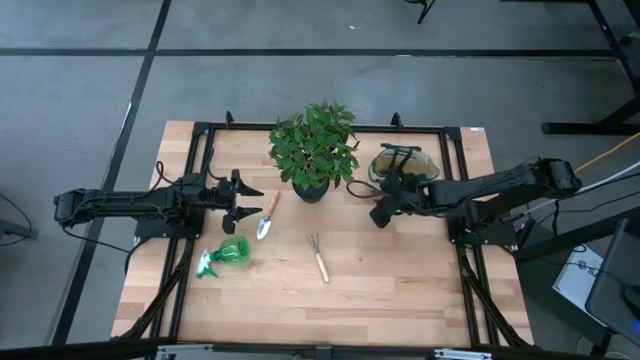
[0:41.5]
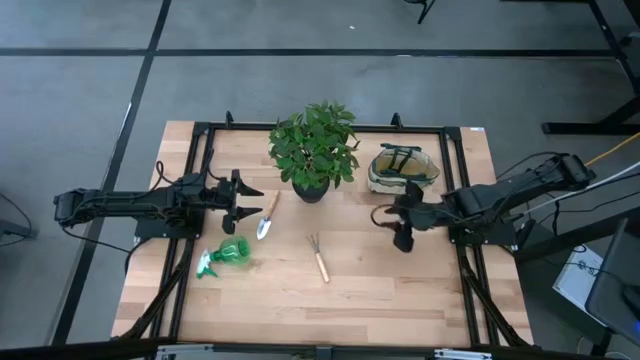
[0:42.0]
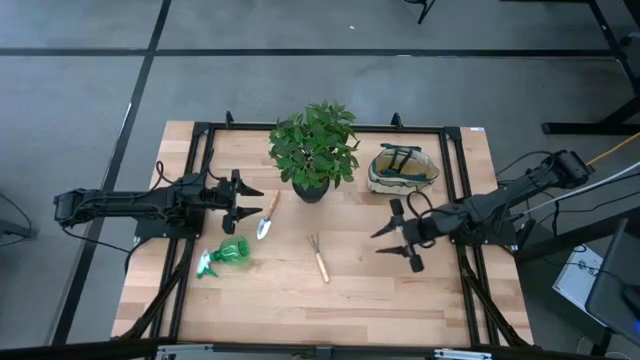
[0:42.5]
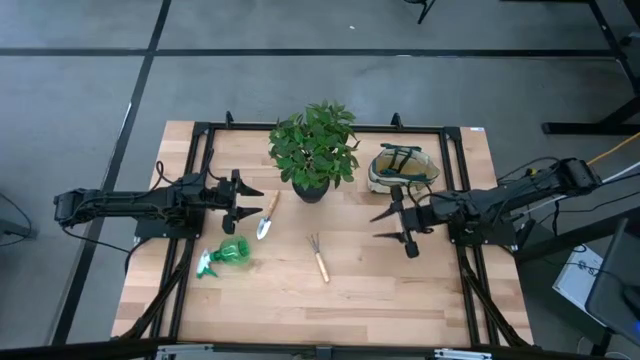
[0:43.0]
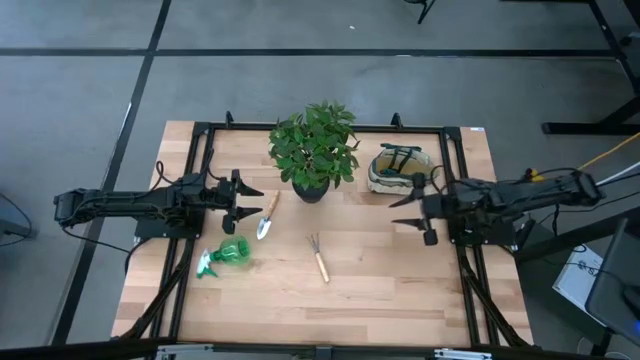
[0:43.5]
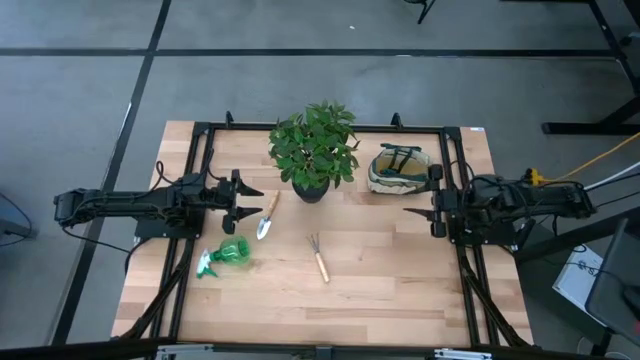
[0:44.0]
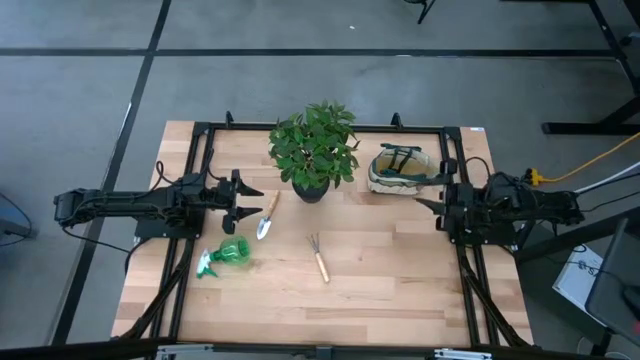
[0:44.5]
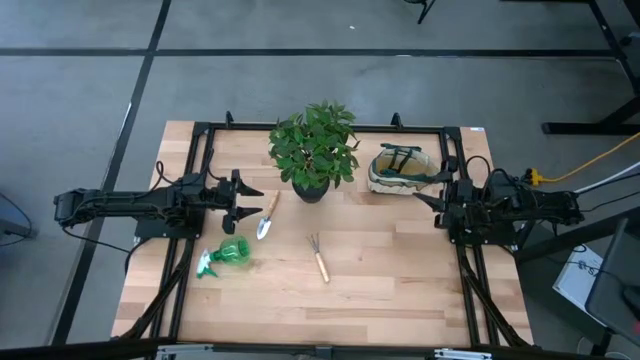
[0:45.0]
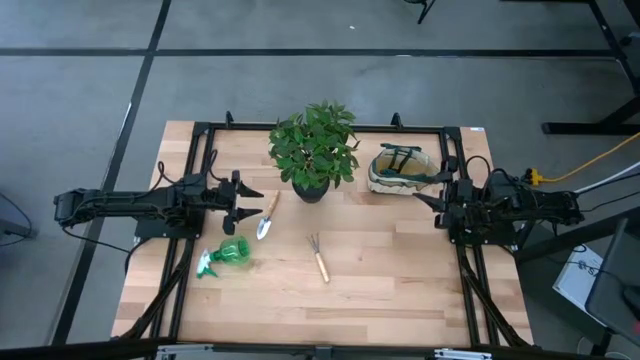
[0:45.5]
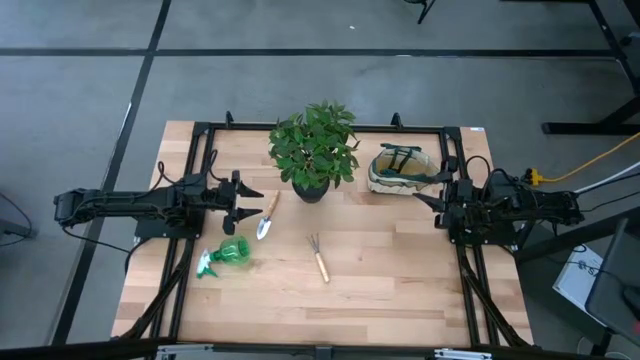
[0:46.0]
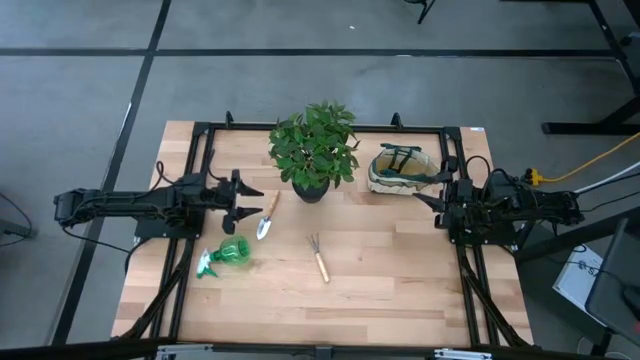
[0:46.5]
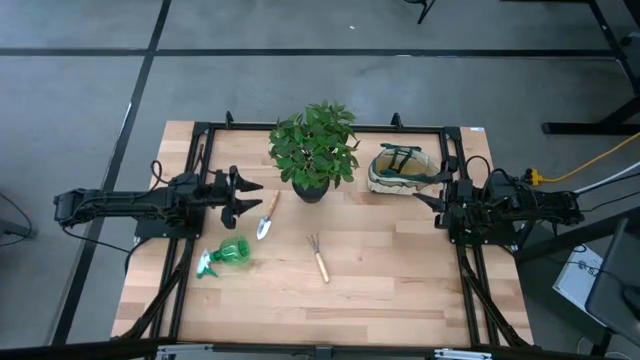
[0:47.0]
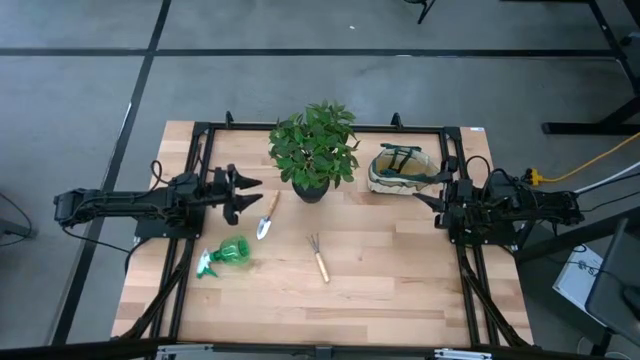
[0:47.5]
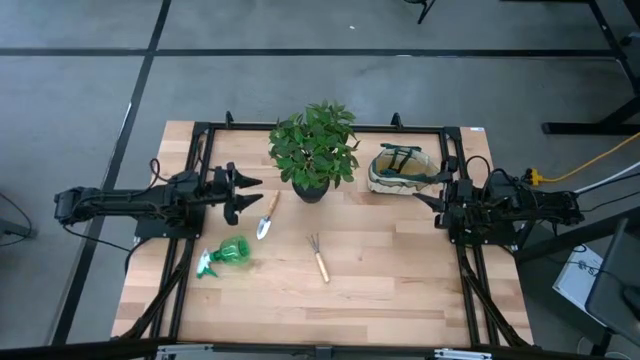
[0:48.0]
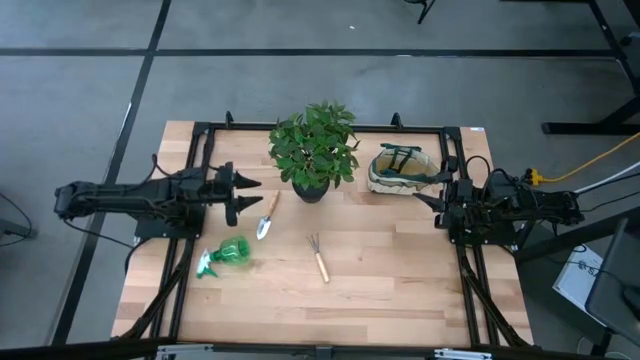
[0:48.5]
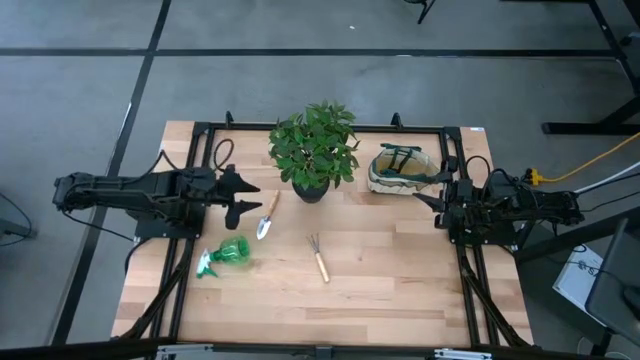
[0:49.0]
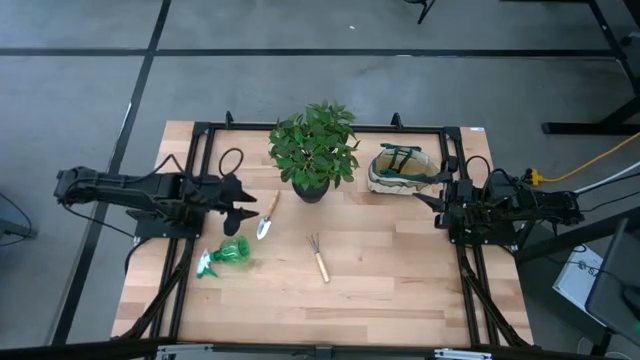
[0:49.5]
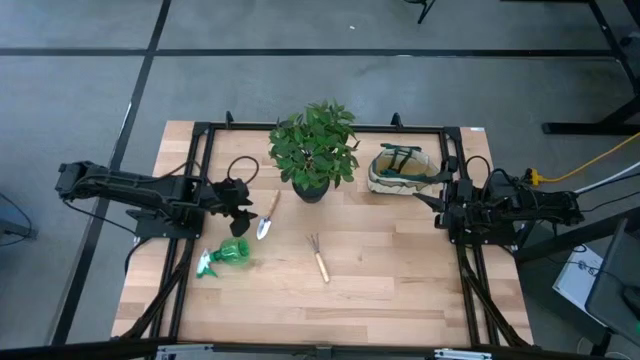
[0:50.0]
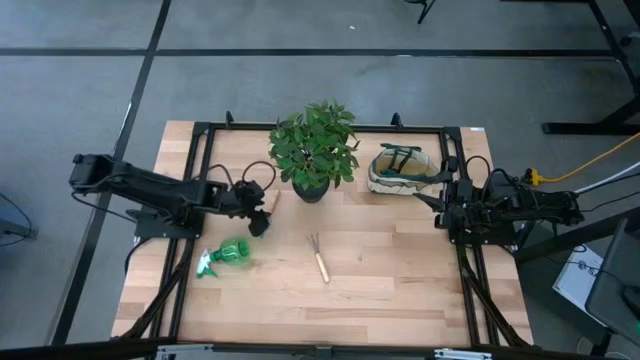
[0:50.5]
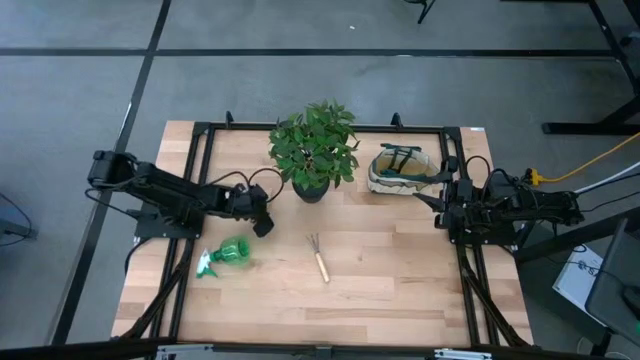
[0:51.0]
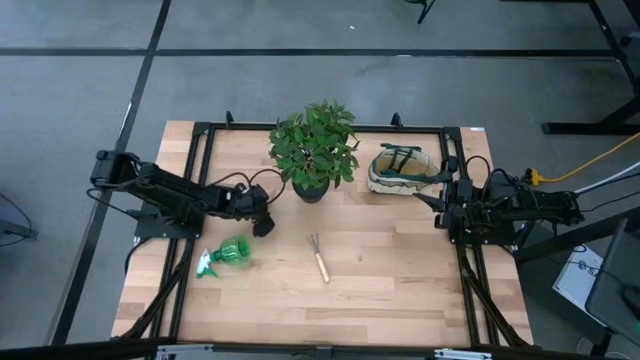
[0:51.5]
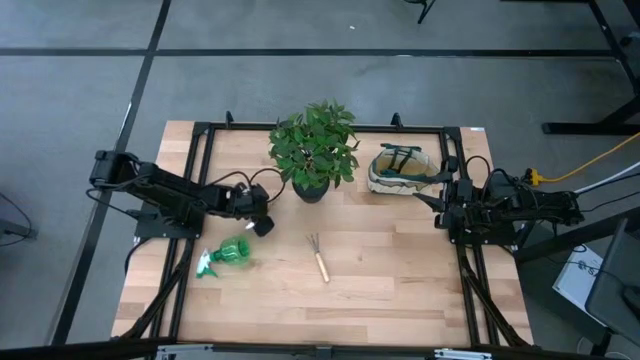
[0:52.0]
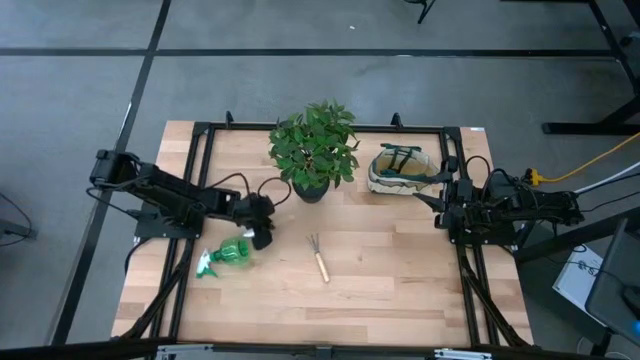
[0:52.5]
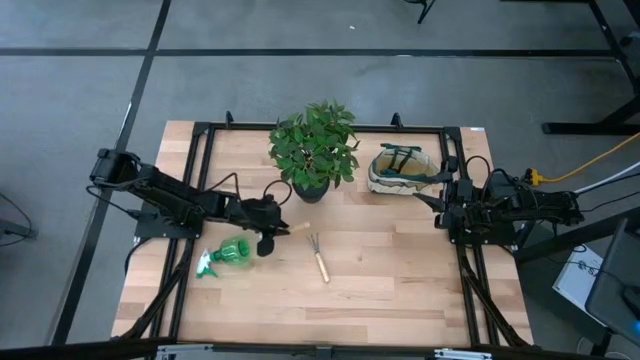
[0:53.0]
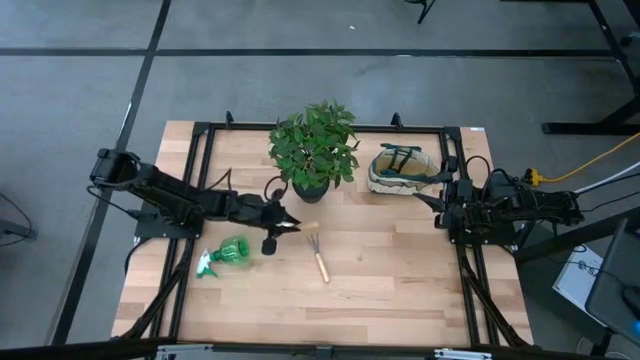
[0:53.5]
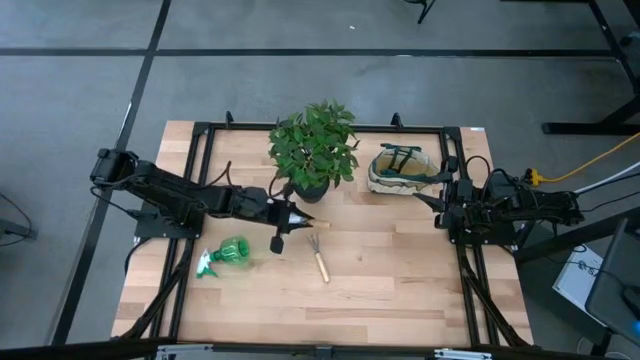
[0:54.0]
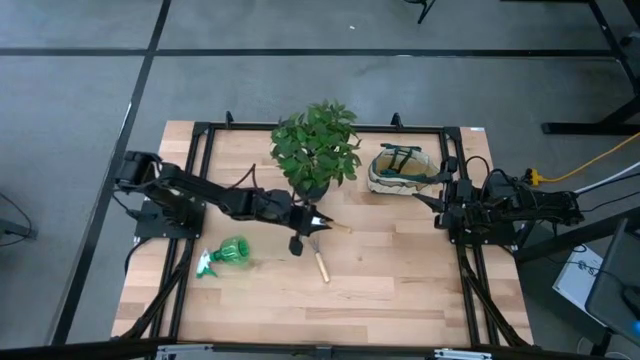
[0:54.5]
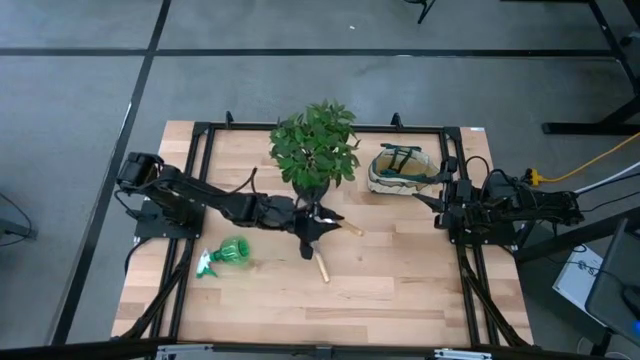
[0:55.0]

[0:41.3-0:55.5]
Task: Pick & Place Garden tools in Gardening bag
Put the brown trowel into the white gardening bag

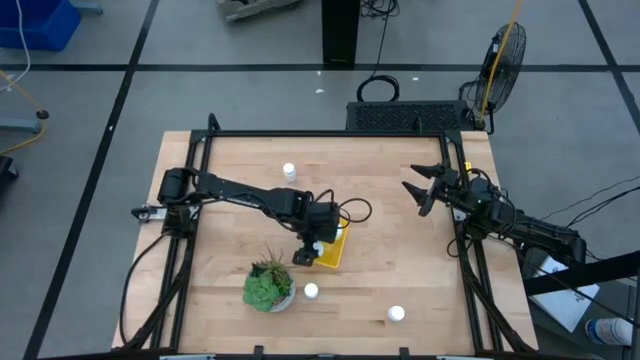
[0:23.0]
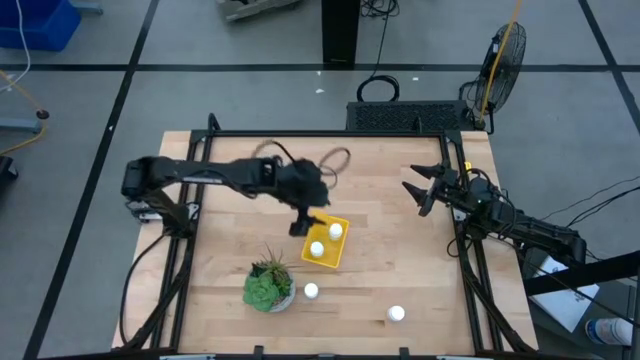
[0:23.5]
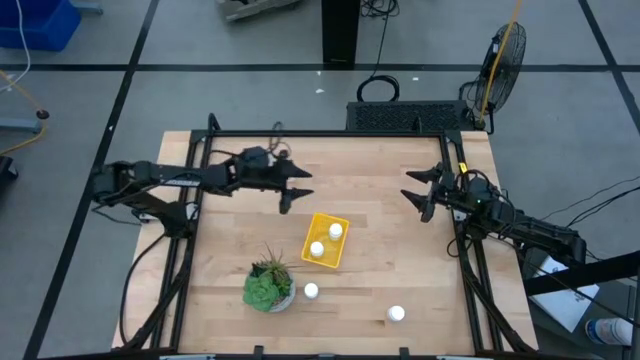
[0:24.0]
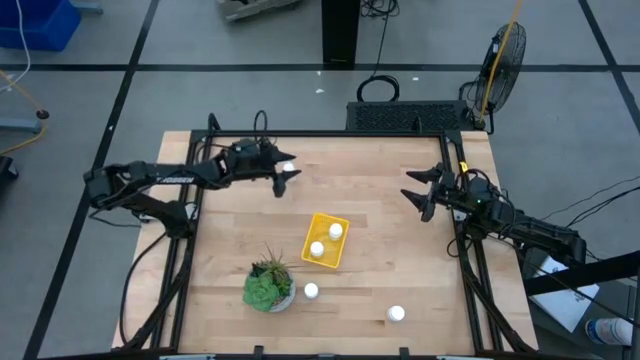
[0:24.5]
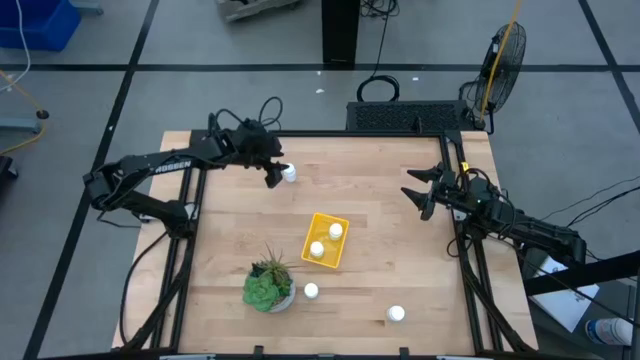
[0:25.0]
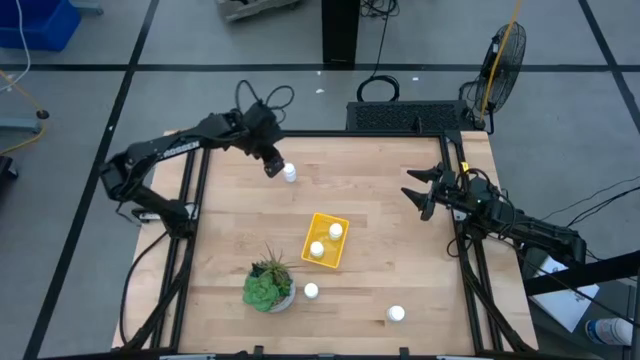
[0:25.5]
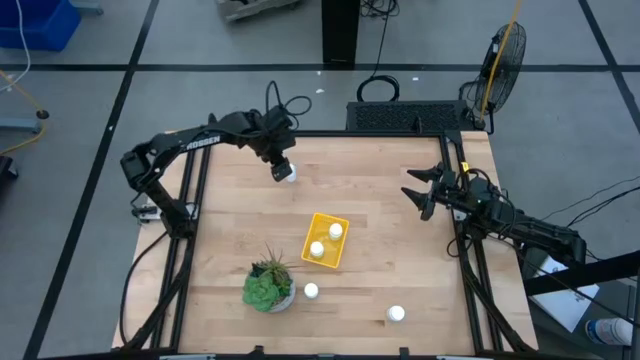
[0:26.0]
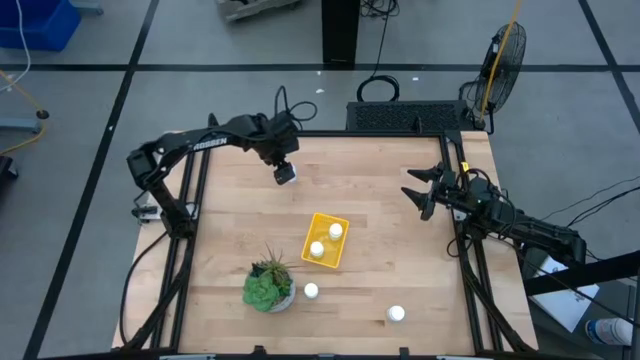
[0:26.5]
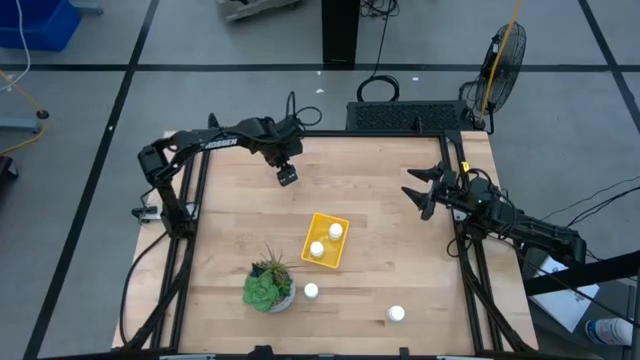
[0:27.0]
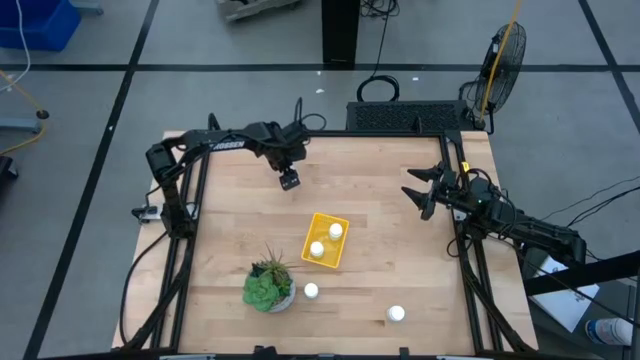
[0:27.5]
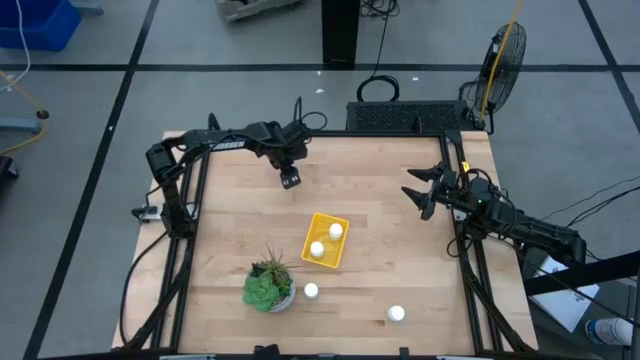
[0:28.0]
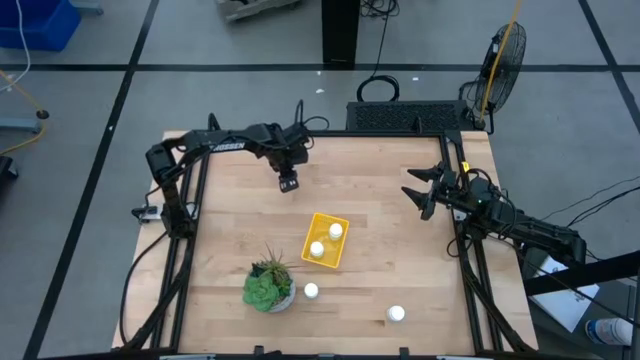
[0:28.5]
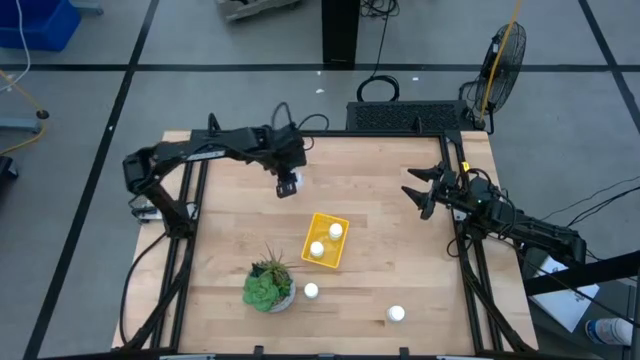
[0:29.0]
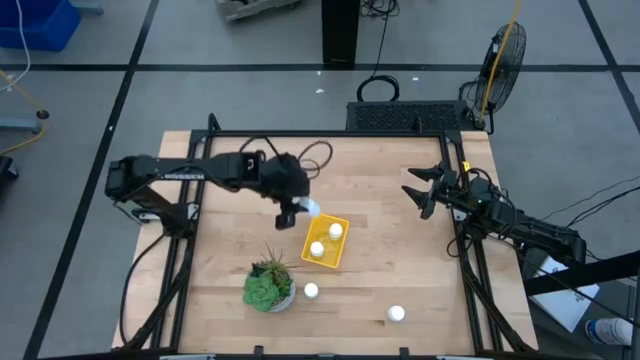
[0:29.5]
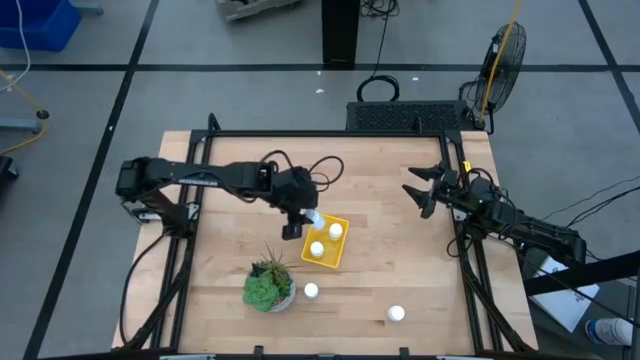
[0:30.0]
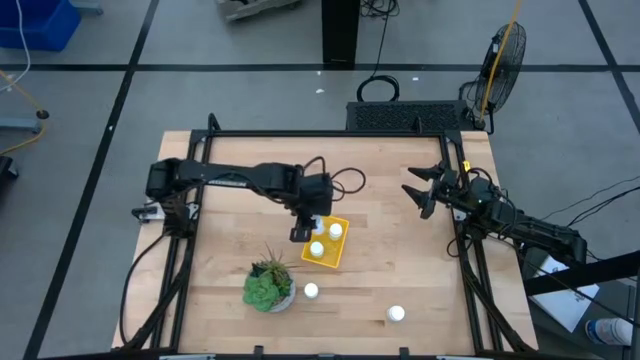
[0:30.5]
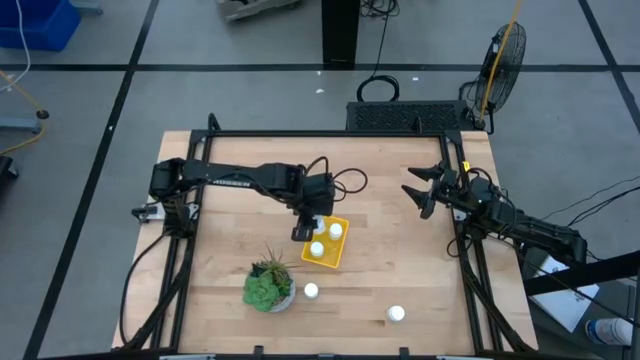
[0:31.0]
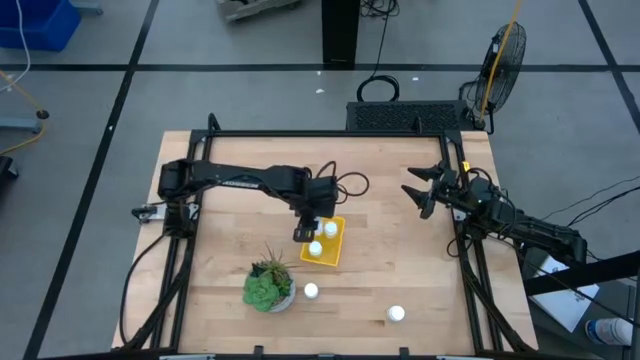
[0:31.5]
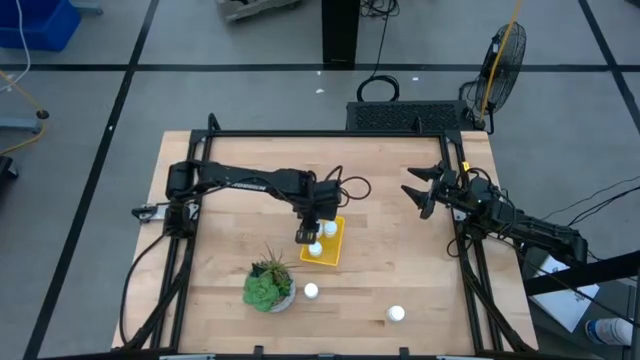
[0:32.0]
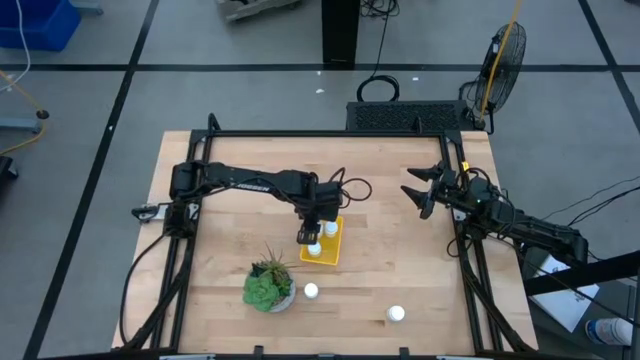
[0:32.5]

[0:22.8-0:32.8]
Task: Pick and place pill bottles into a basket
Put the white pill bottle into the yellow bin
